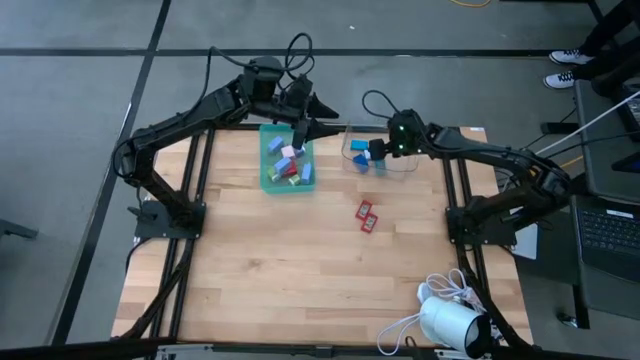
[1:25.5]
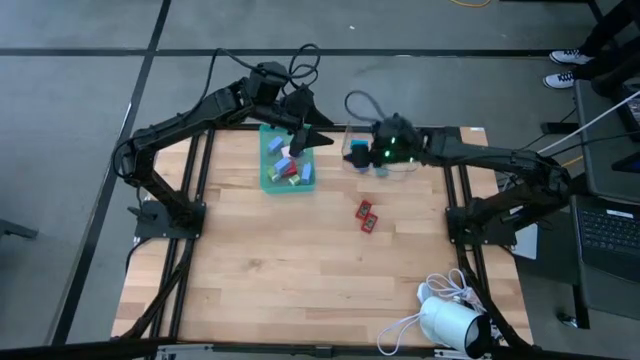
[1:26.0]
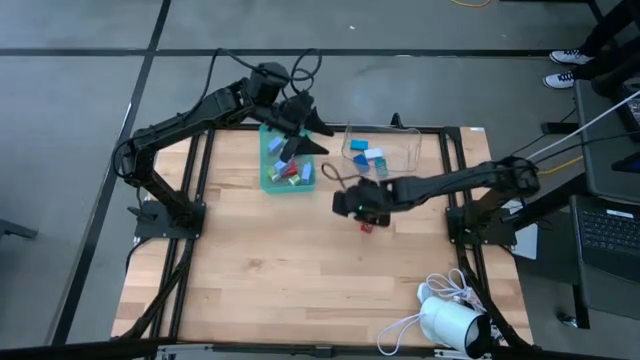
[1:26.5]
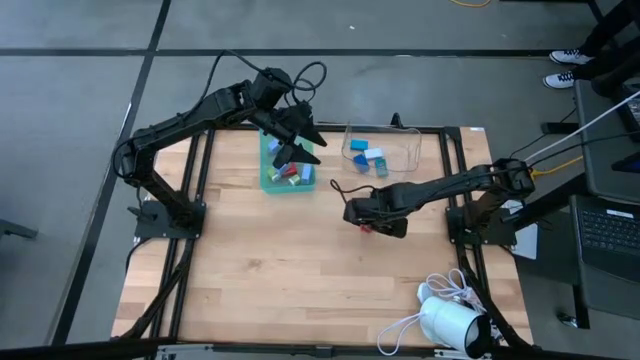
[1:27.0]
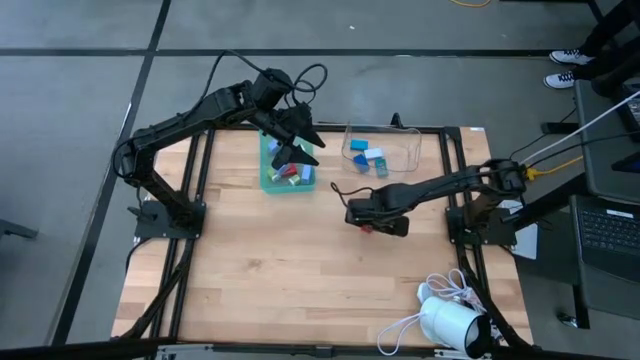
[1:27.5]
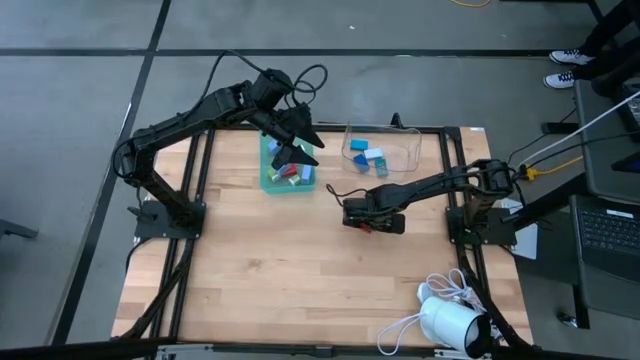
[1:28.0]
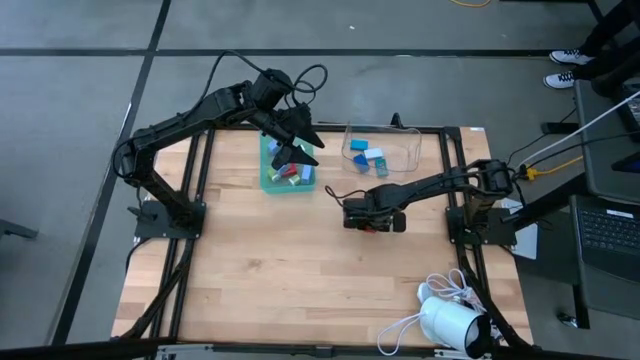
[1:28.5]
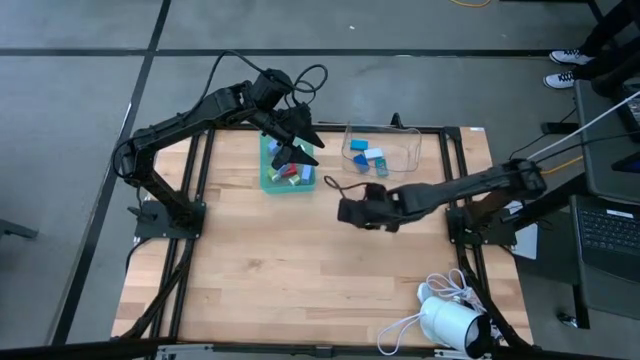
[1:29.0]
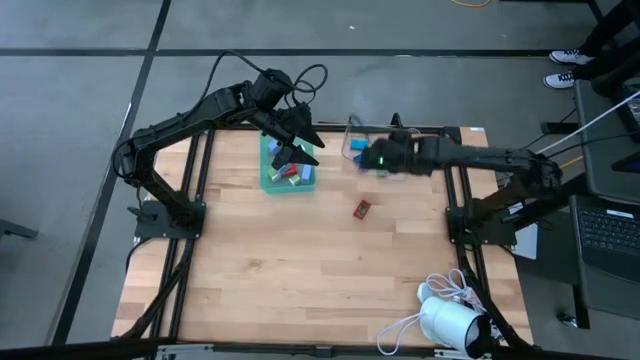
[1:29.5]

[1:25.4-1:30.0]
Task: Pick & Place Office items
Put the right red digital clock into the transparent bin

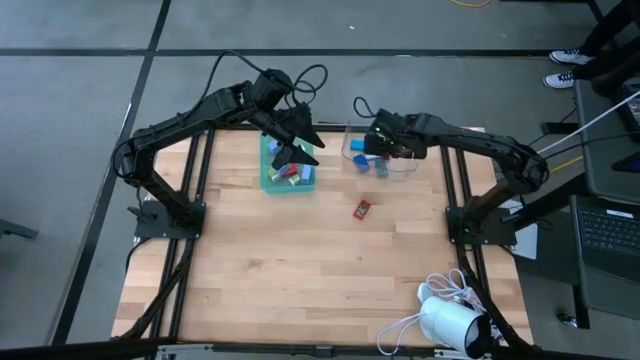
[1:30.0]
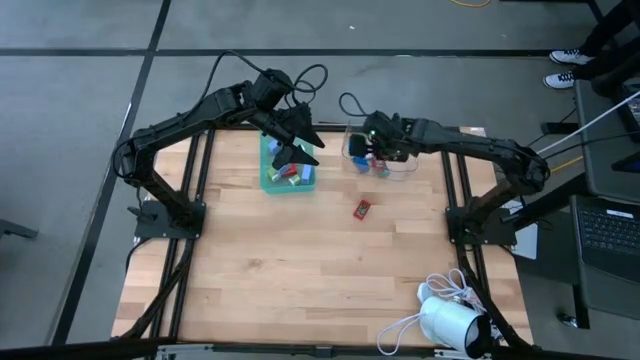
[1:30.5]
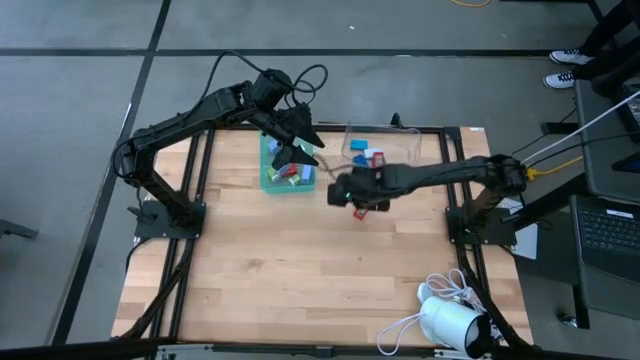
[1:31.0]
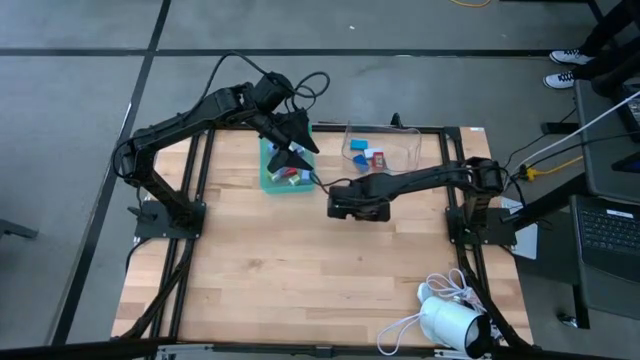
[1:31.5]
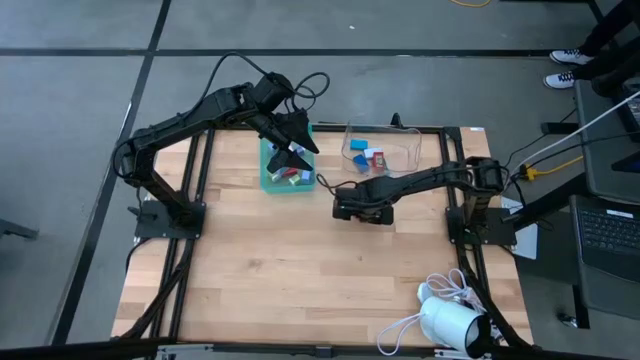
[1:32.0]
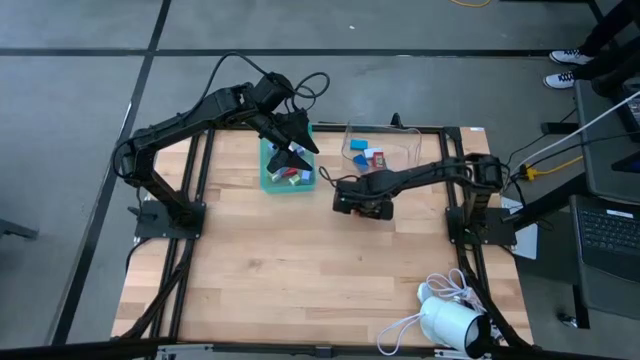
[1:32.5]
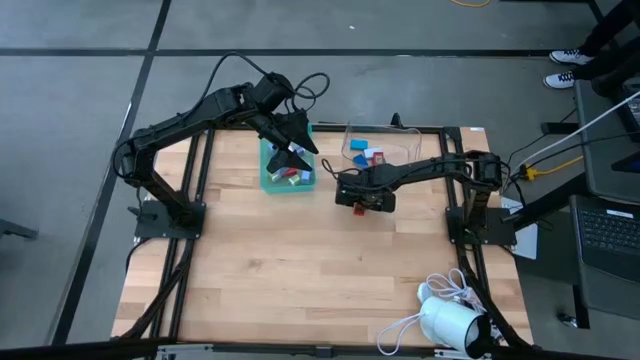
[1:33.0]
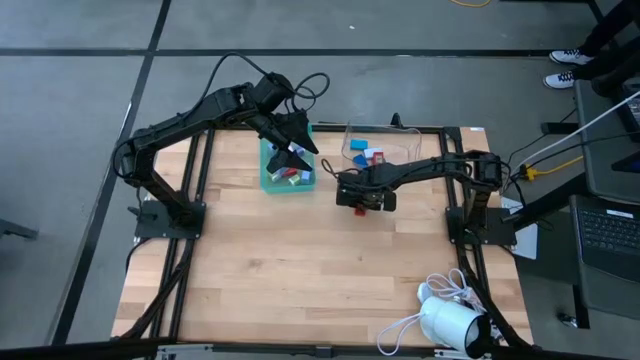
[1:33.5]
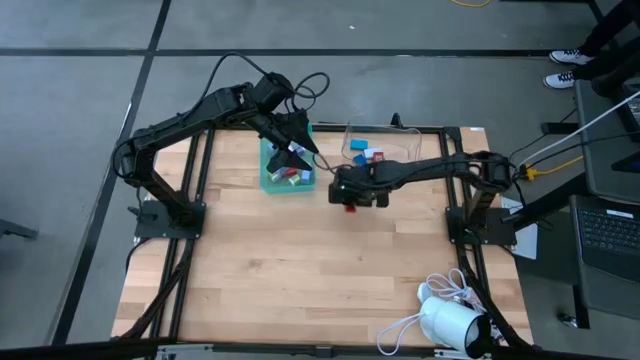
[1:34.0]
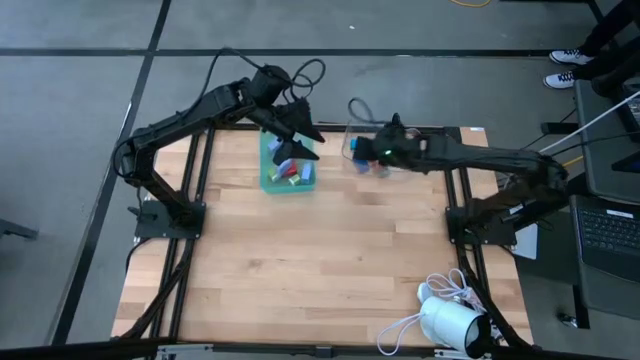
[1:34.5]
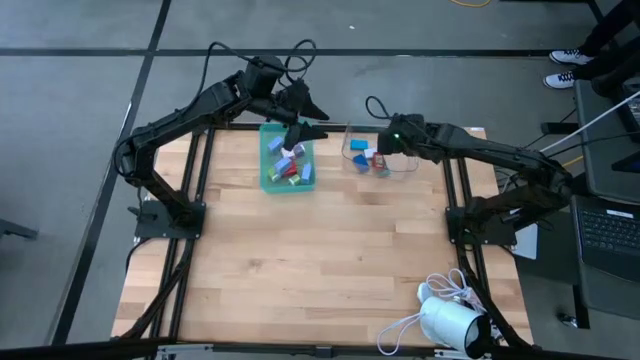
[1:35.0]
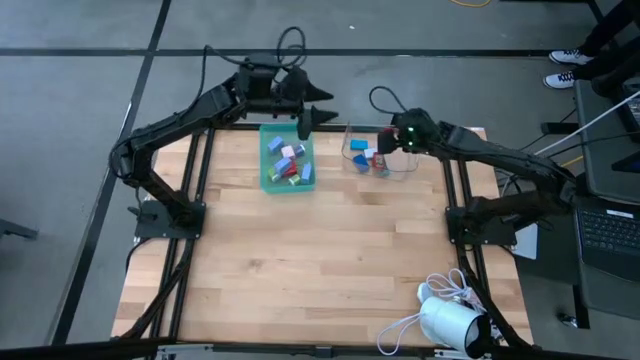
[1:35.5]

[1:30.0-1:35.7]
Put the red digital clock into the transparent bin

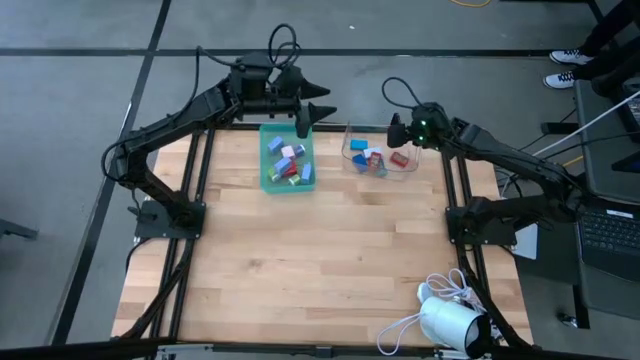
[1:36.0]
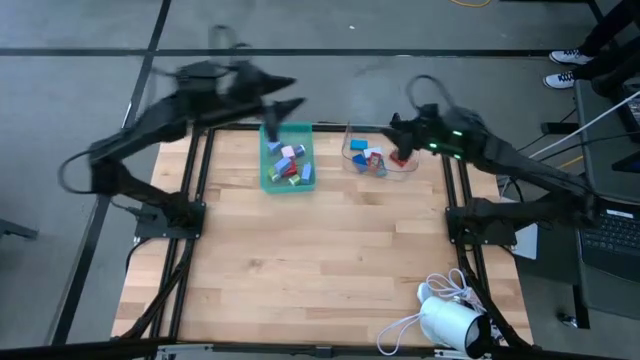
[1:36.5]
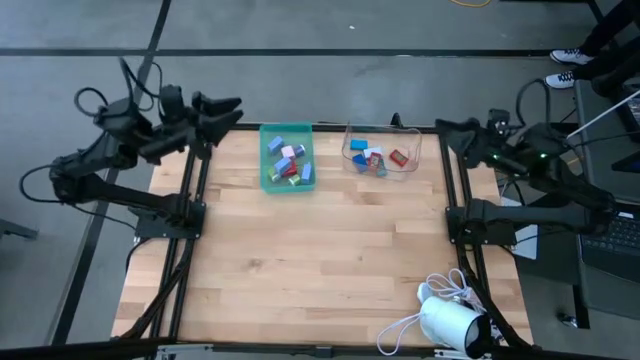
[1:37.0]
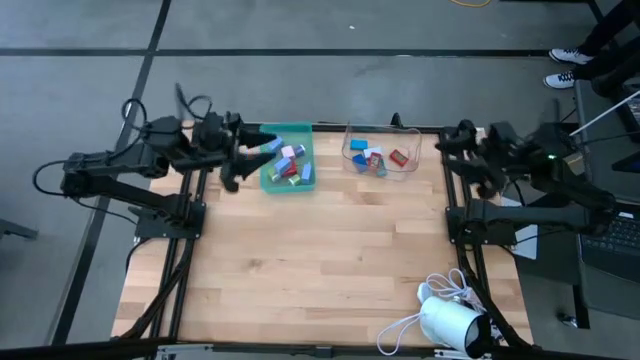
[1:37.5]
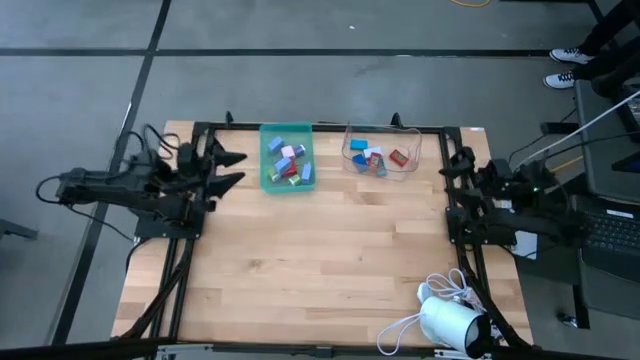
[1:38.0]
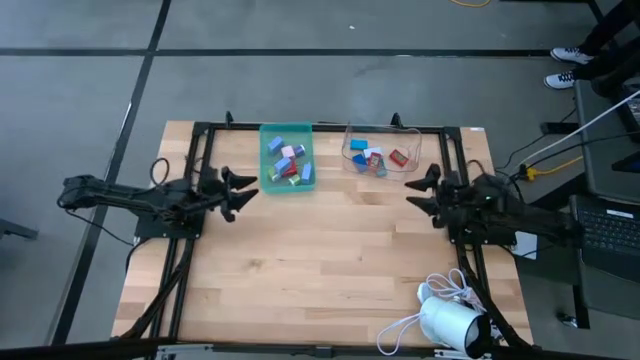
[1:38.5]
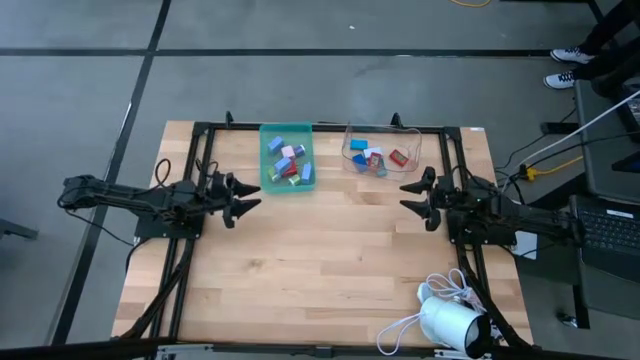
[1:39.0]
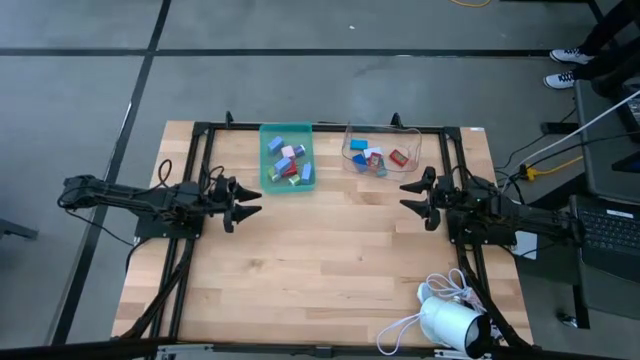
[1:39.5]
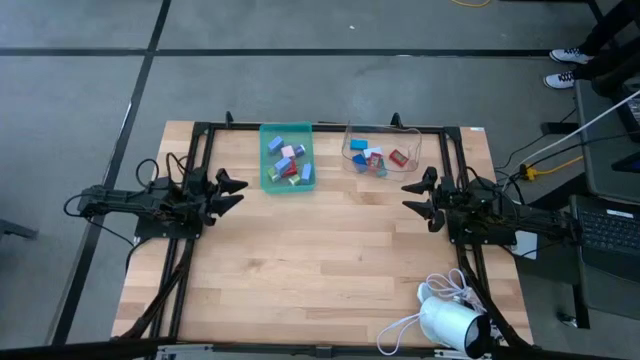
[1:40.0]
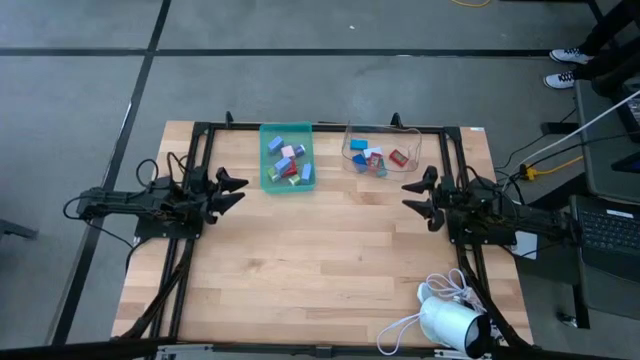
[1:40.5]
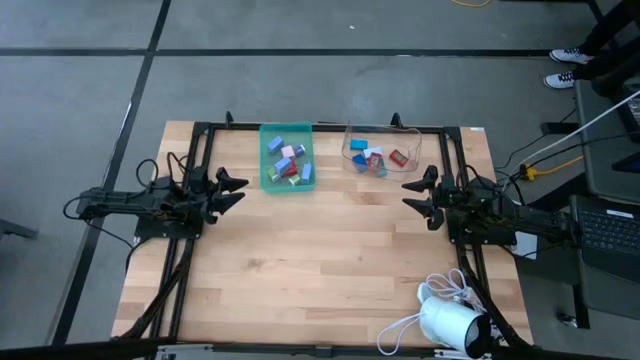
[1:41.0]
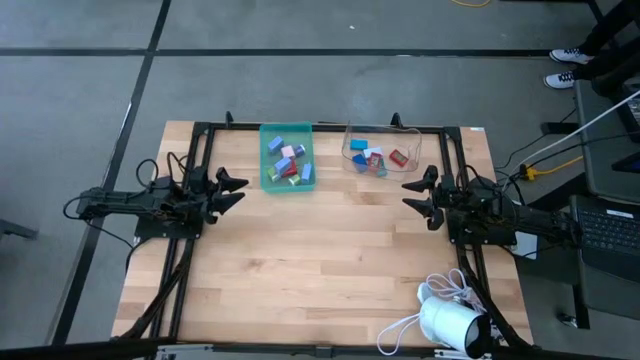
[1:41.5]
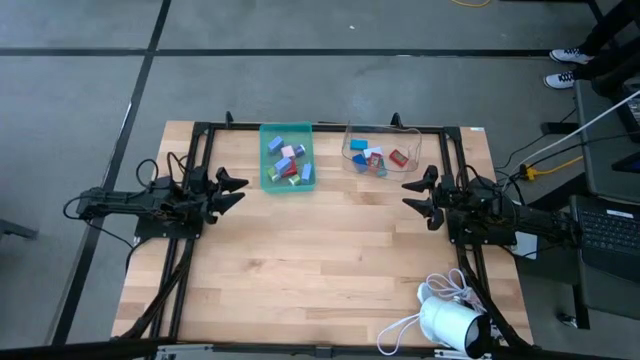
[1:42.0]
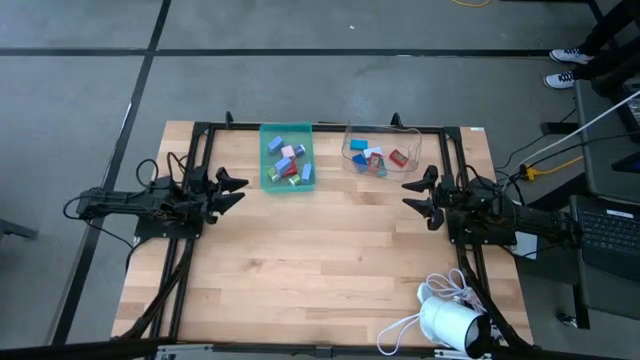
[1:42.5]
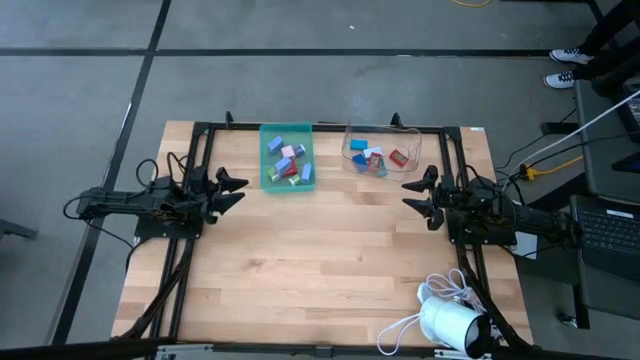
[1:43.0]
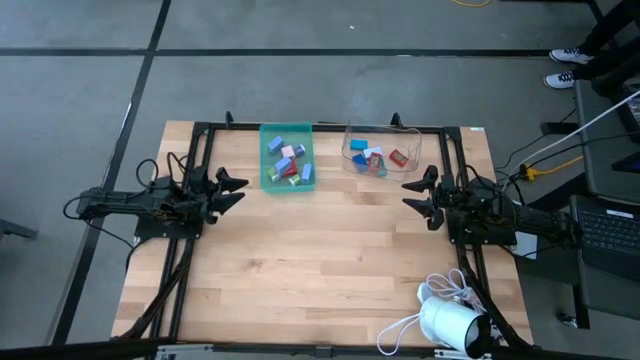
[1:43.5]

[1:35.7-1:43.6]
Return to Home Position

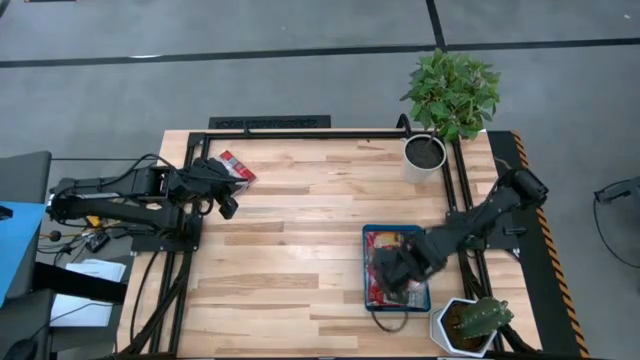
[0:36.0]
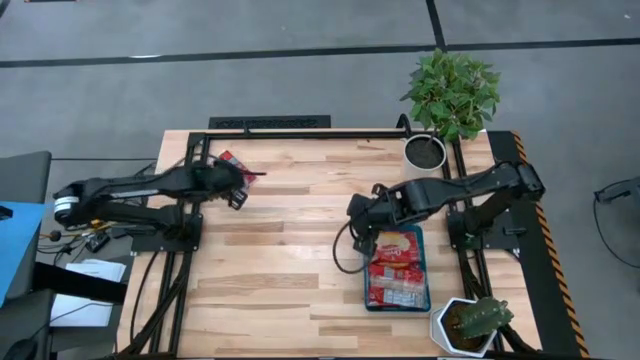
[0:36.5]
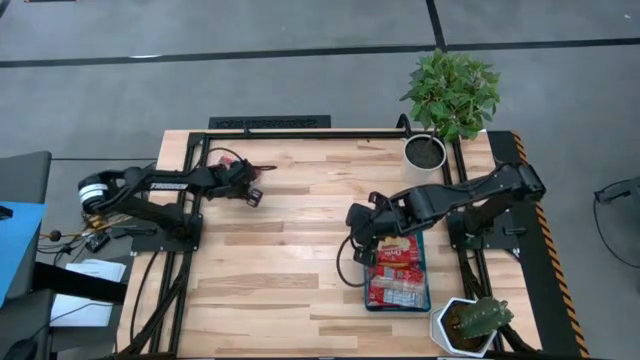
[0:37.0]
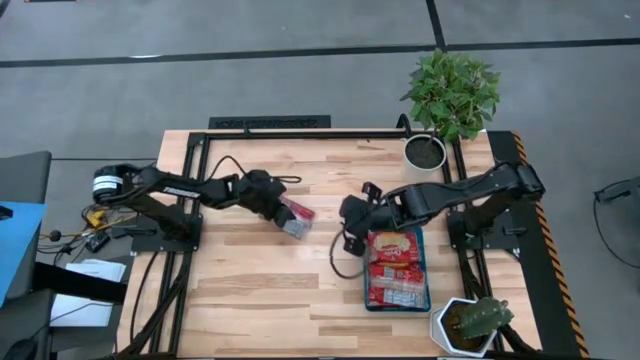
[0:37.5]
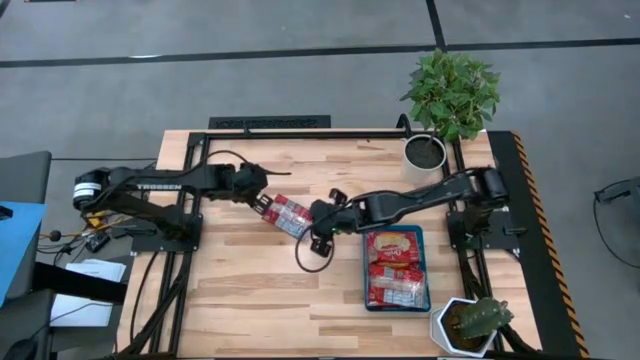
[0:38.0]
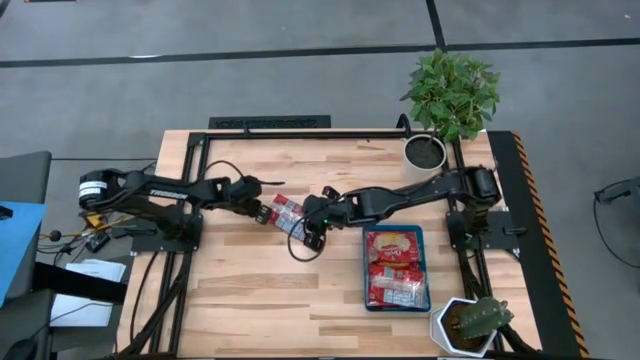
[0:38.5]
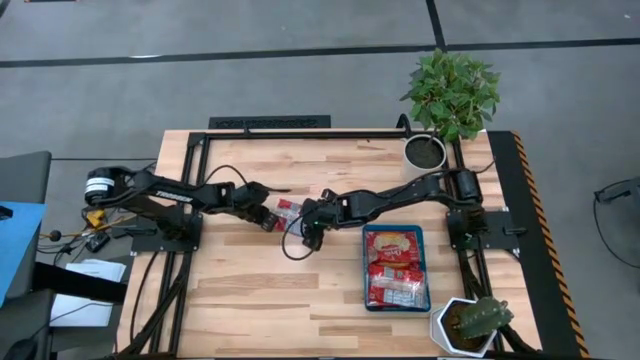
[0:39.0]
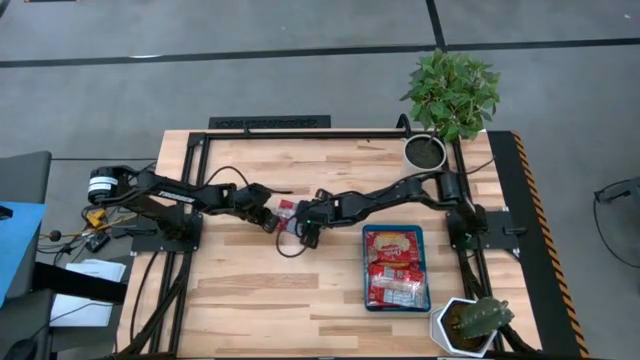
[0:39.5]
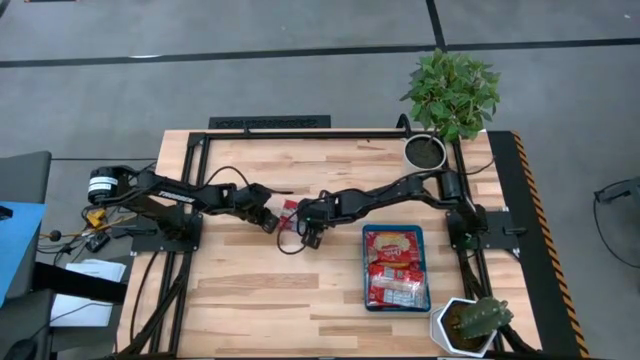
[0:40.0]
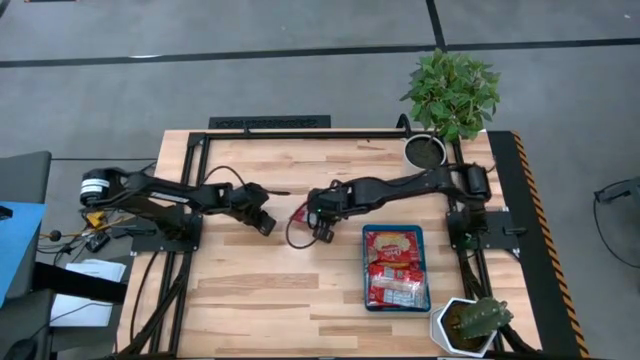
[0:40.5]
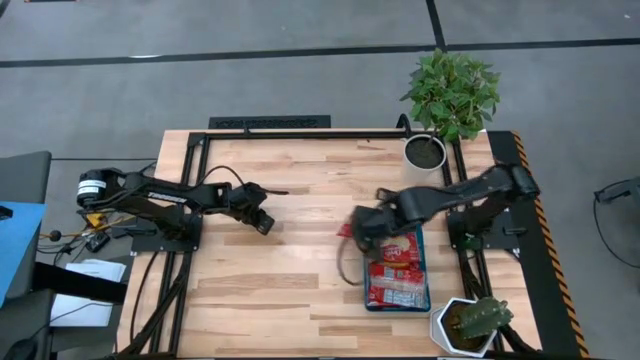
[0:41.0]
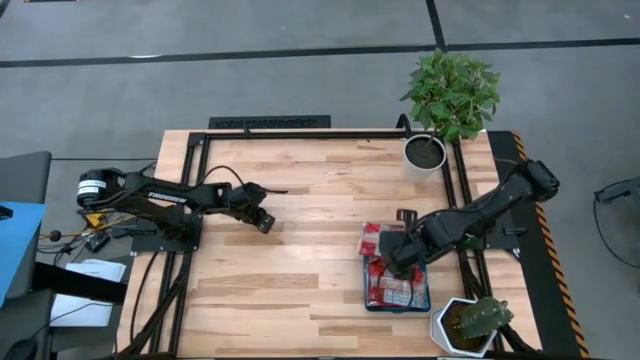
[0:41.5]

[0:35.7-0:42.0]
Task: Sort popcorn bags into baskets
Put the red popcorn bag into the blue bin
